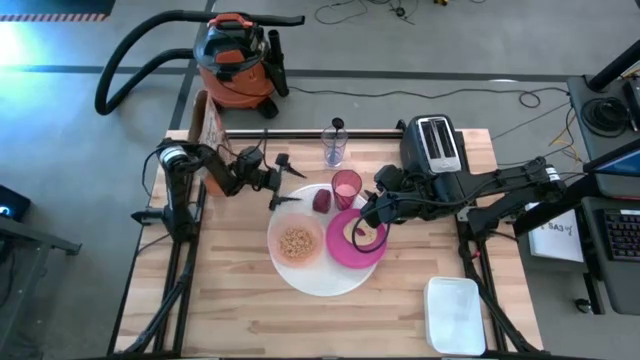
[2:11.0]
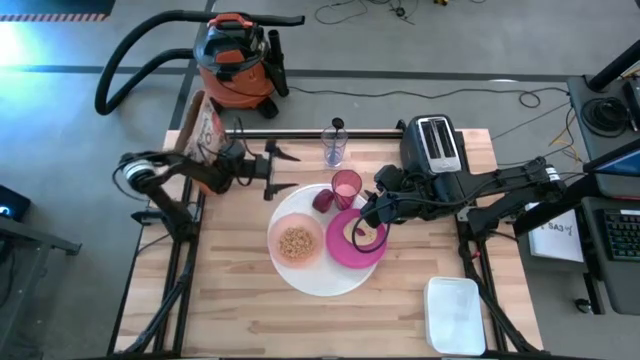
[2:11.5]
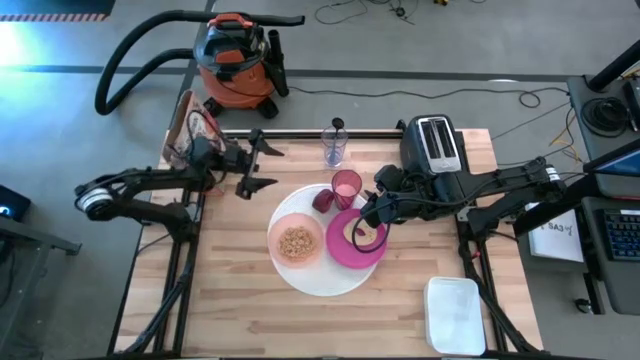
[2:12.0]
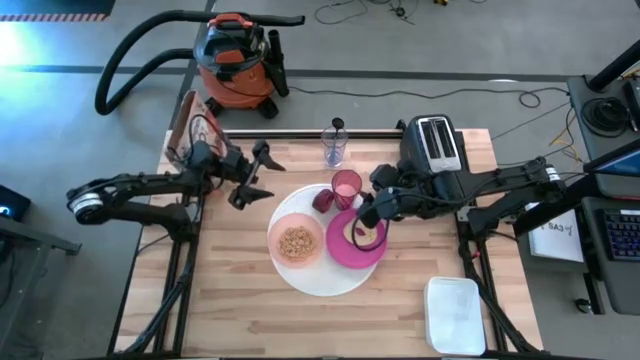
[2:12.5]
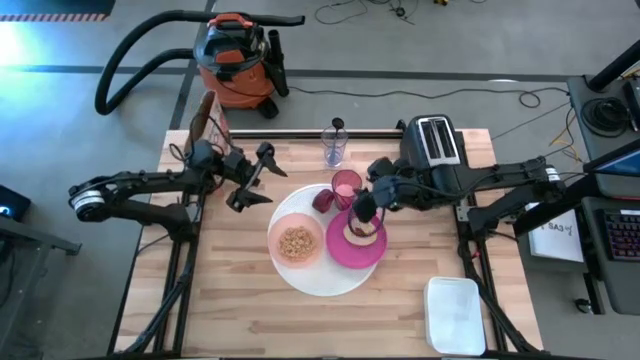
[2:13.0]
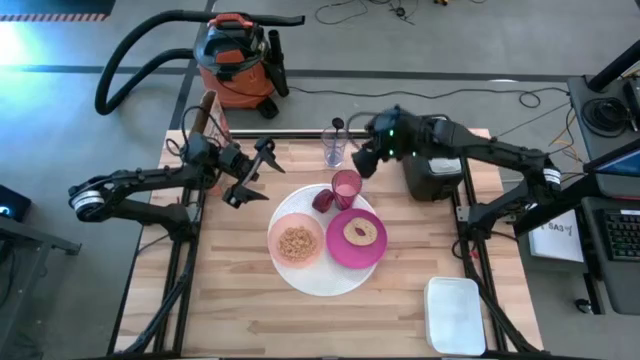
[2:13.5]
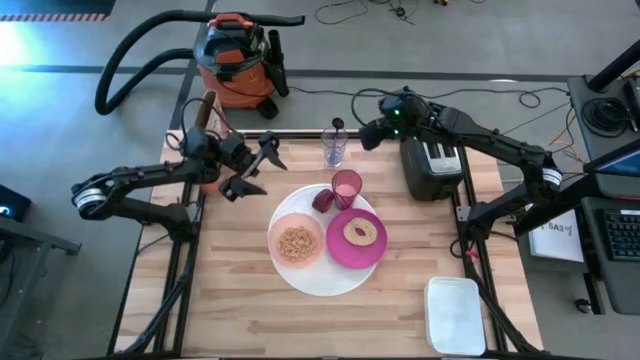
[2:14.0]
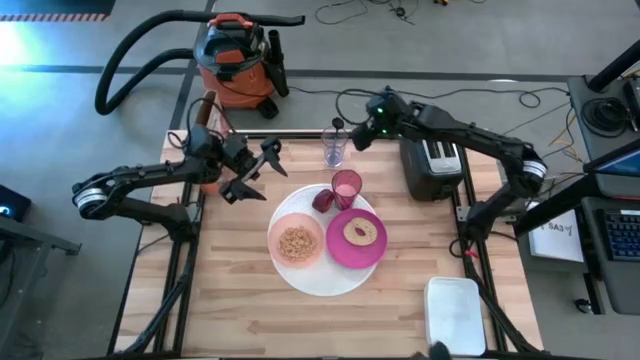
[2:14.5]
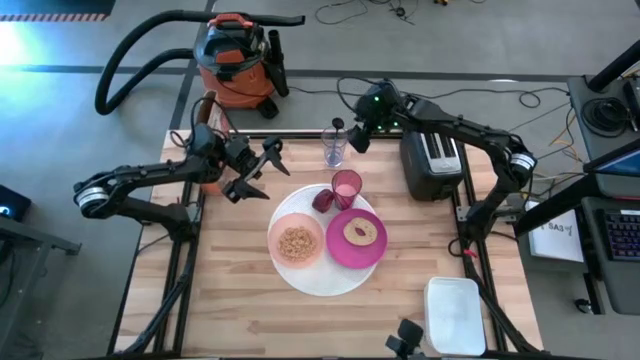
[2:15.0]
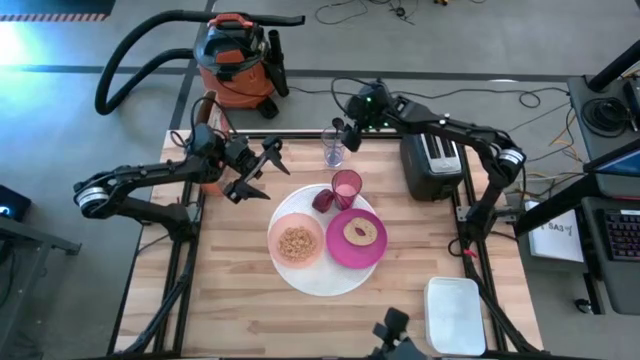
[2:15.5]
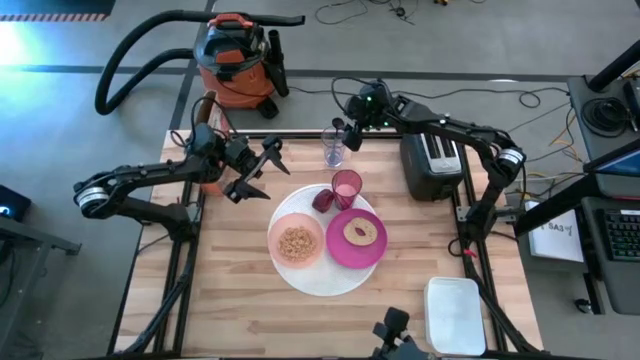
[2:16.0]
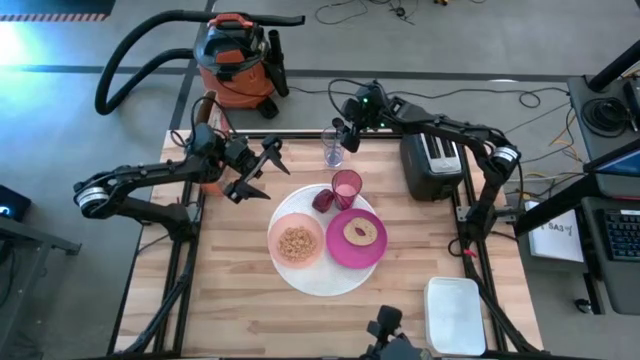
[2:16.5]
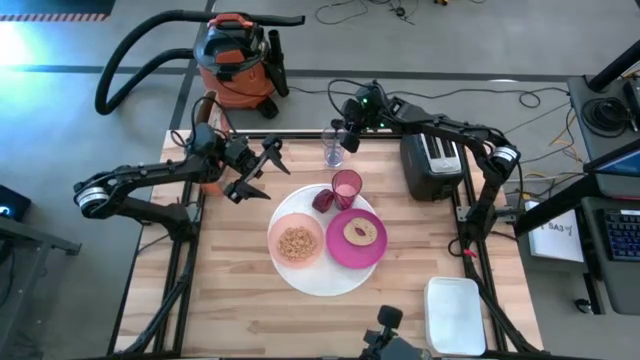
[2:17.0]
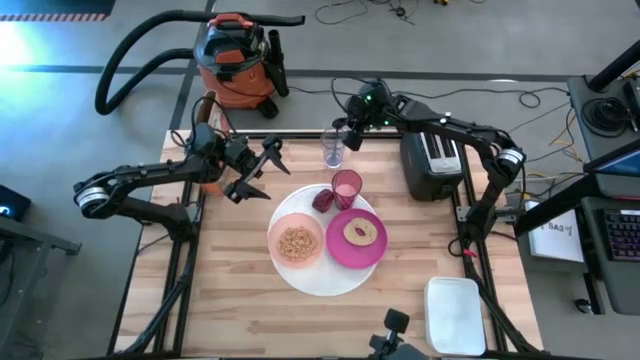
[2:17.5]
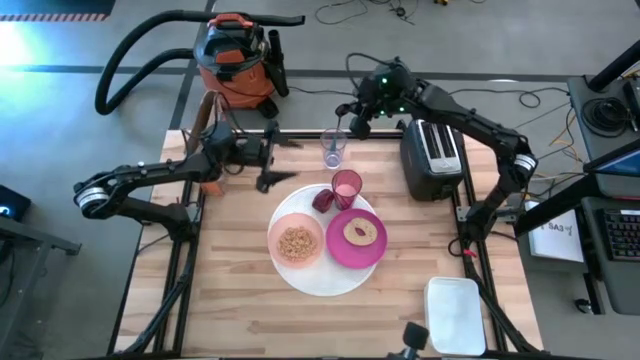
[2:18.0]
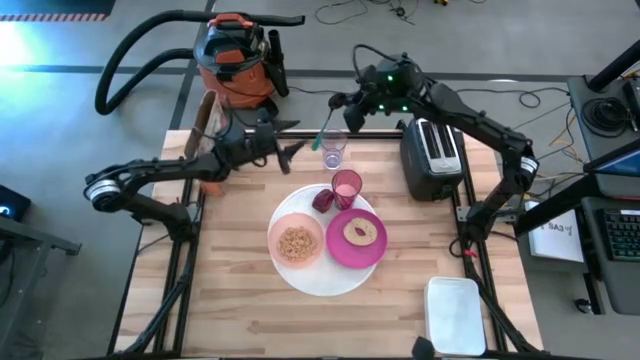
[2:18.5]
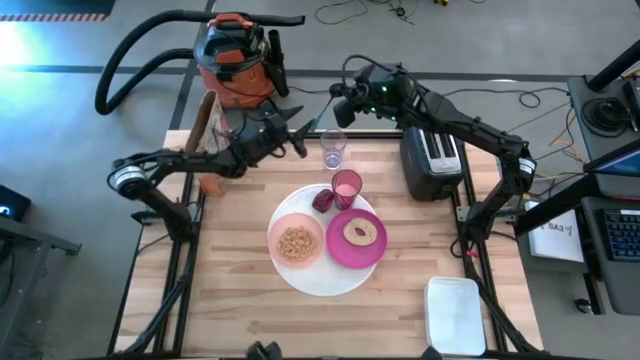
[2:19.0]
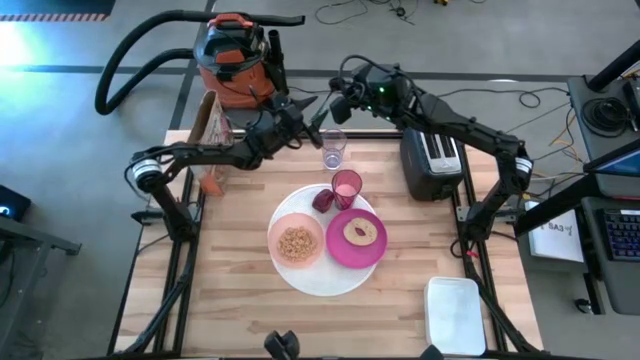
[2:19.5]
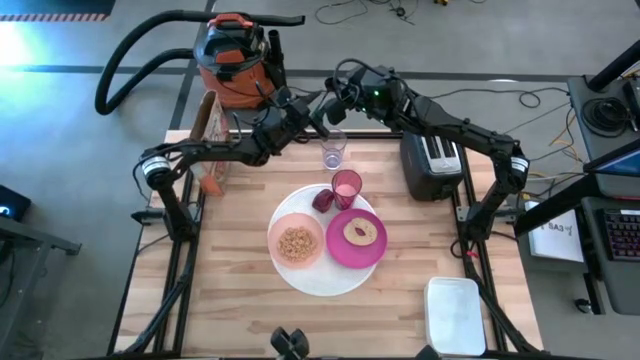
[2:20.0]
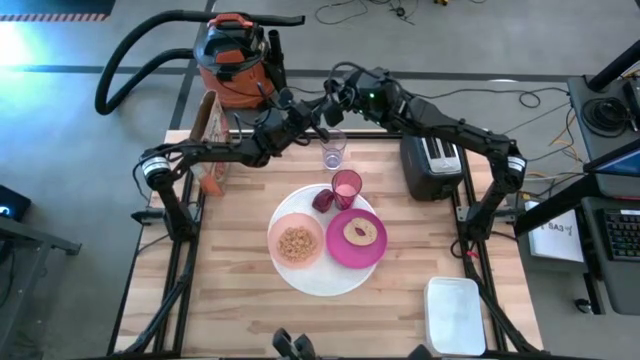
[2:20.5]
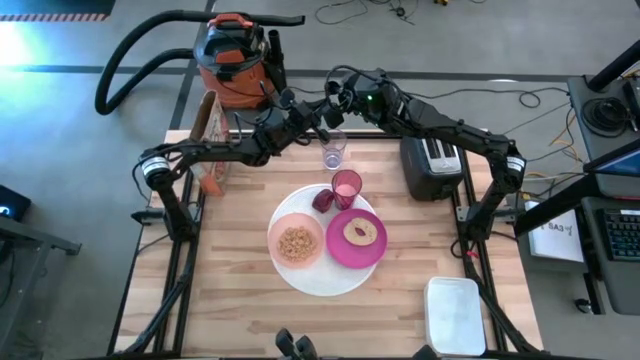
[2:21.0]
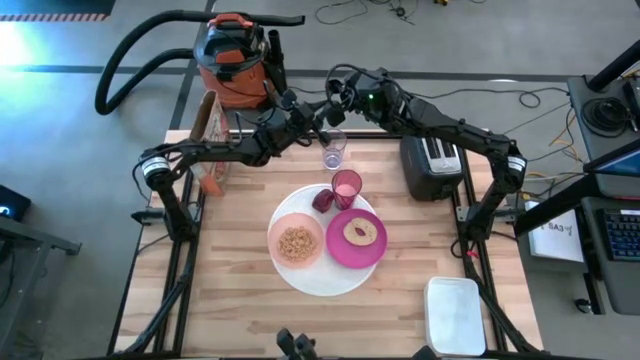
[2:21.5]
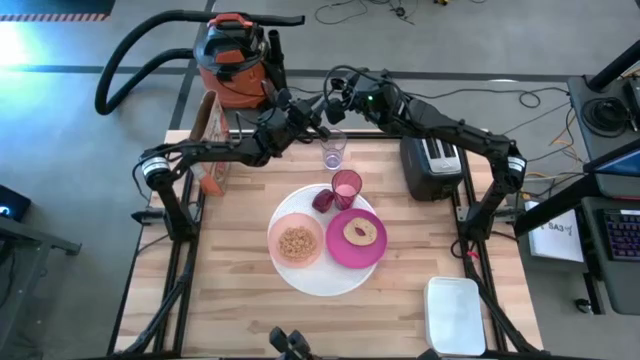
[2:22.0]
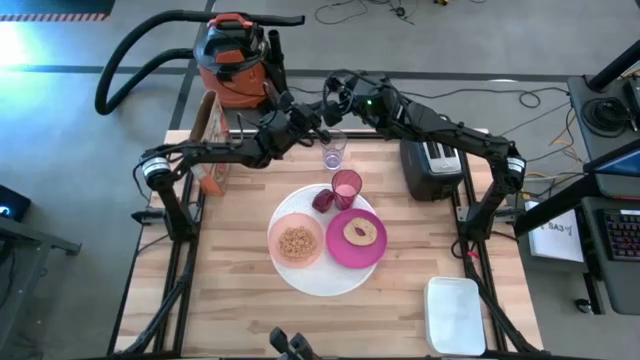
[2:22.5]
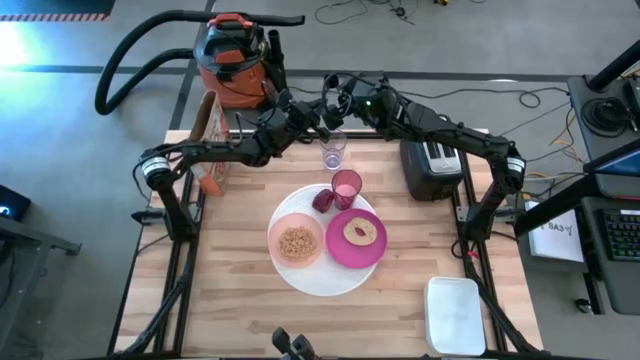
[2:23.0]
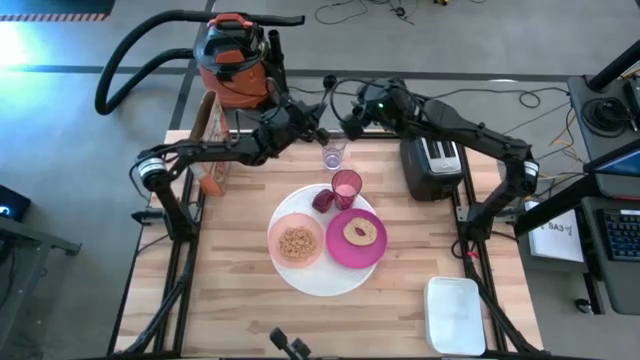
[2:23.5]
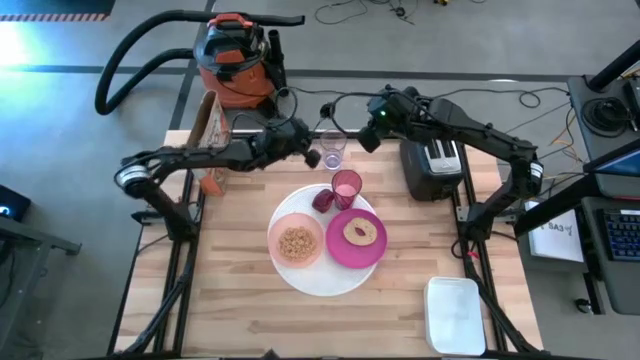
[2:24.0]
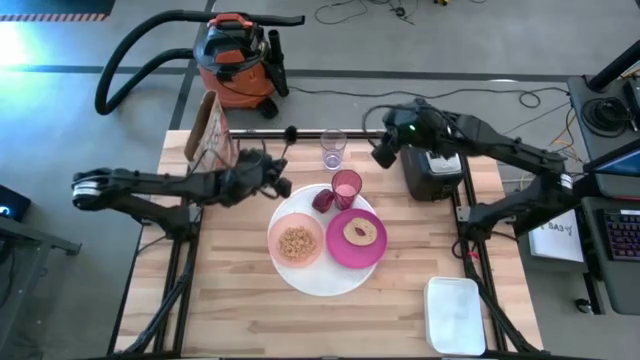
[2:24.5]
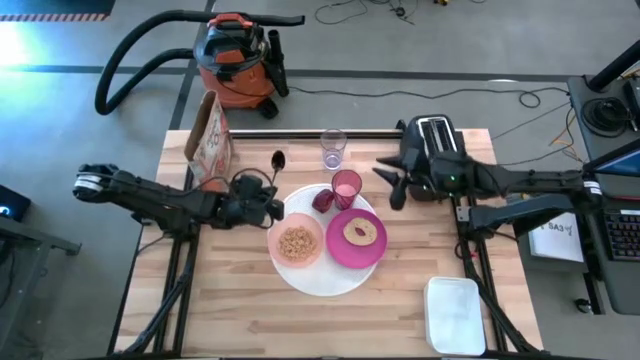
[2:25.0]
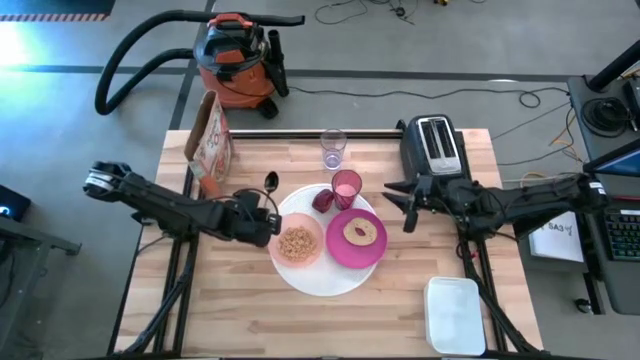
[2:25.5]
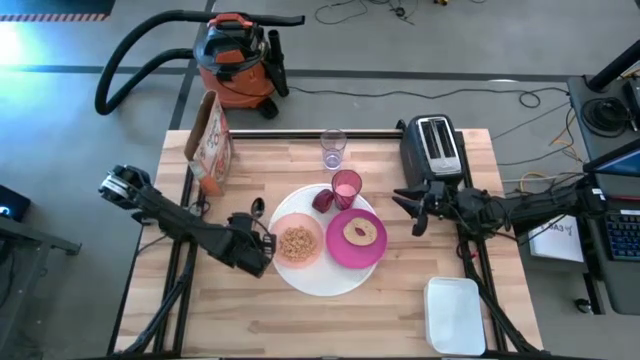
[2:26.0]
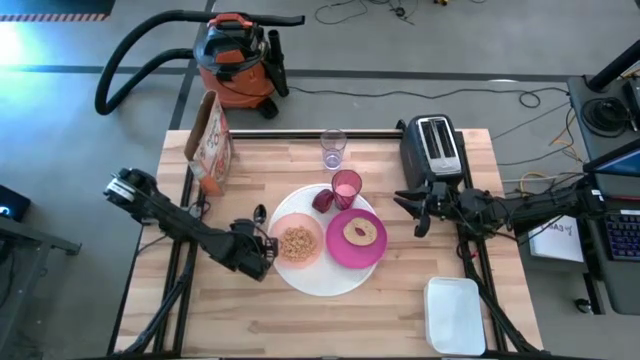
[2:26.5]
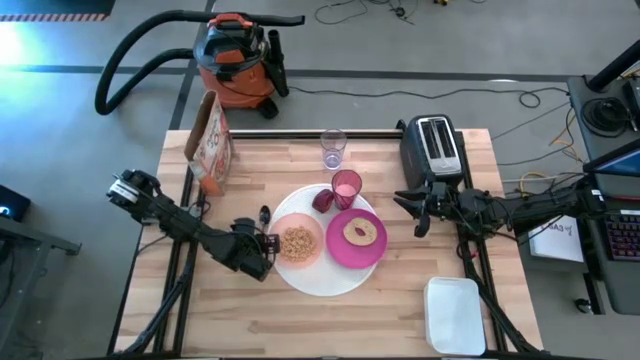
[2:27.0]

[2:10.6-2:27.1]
Task: Arrange a breakfast setting
Put the blue spoon on the table to the left of the white table mat

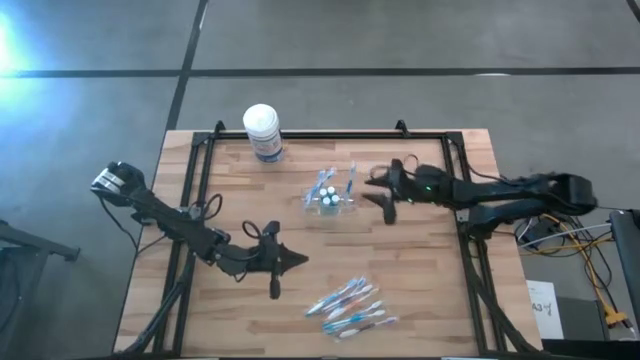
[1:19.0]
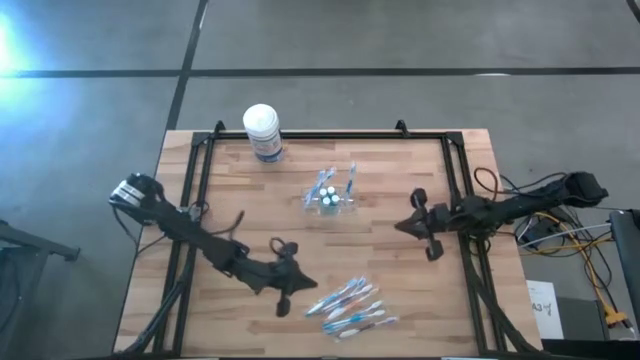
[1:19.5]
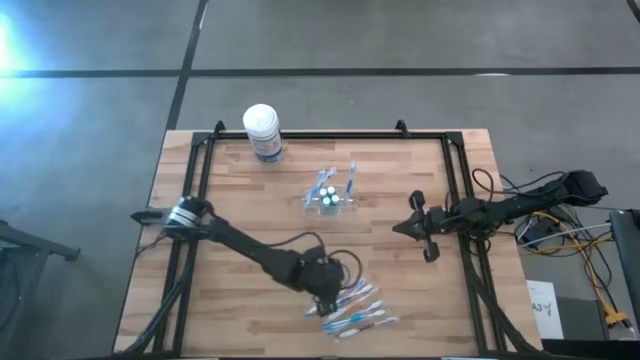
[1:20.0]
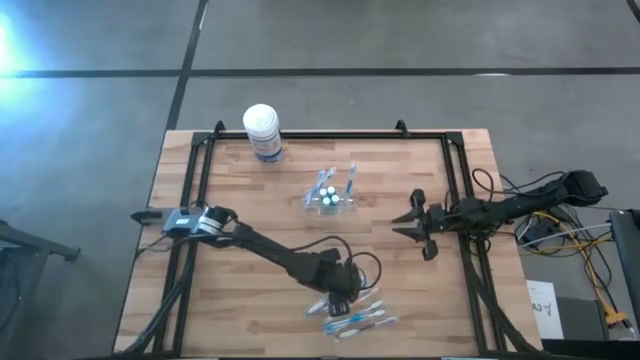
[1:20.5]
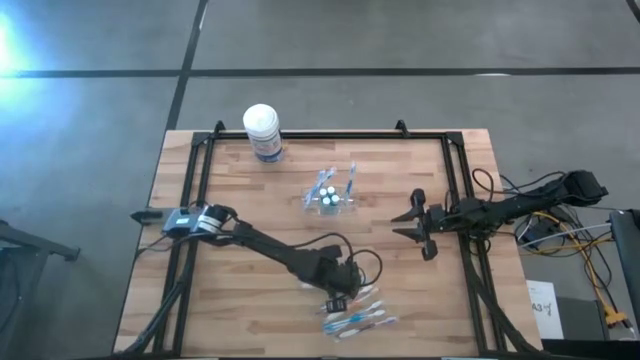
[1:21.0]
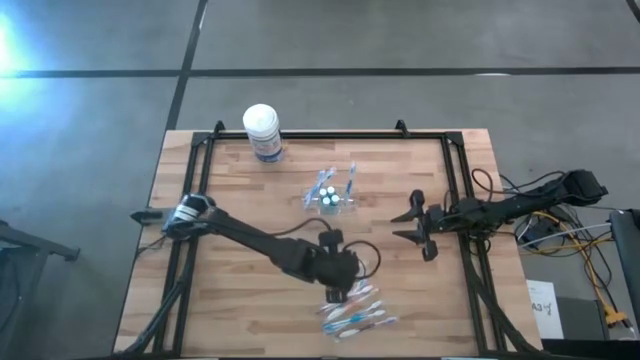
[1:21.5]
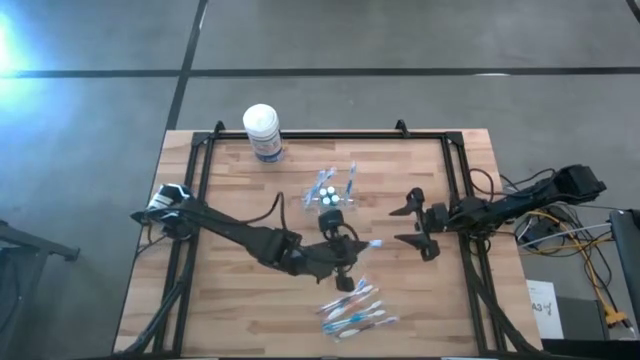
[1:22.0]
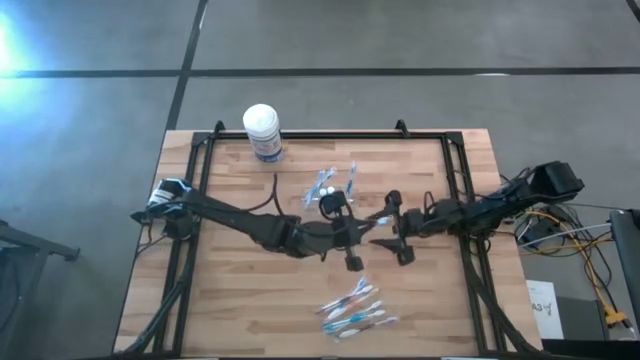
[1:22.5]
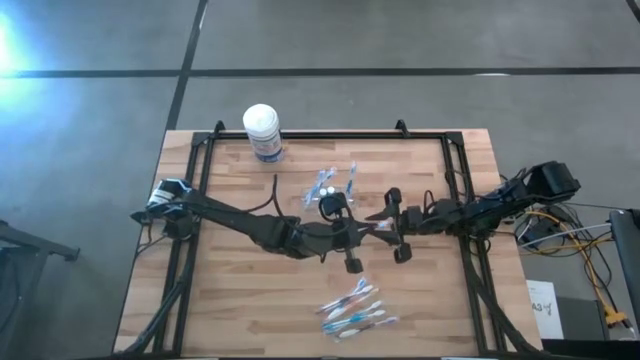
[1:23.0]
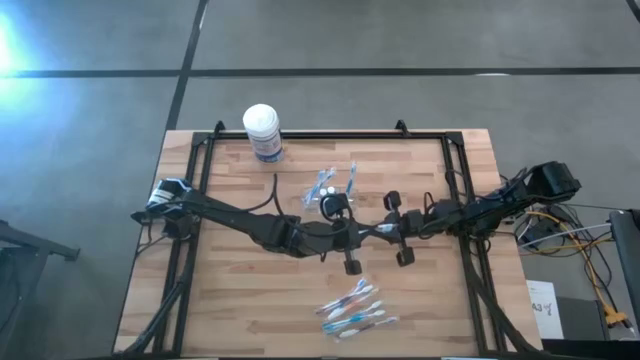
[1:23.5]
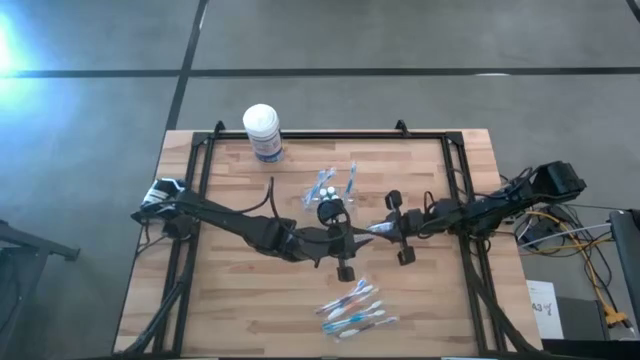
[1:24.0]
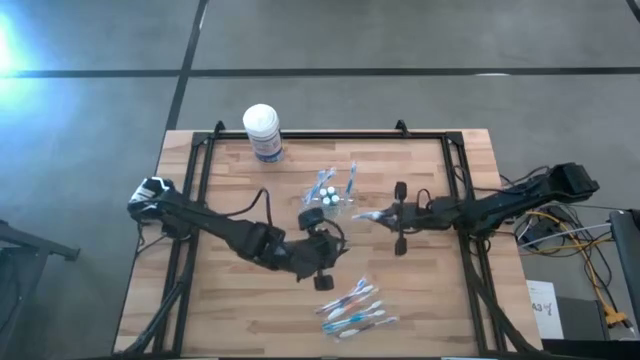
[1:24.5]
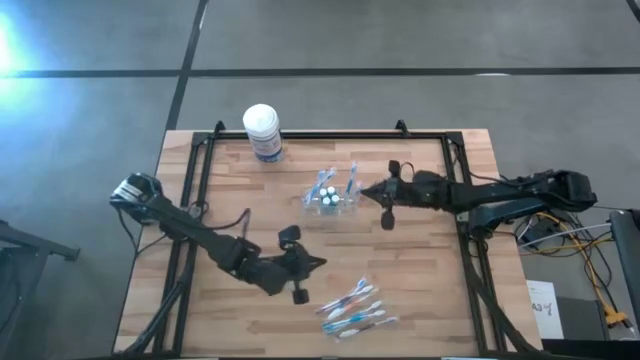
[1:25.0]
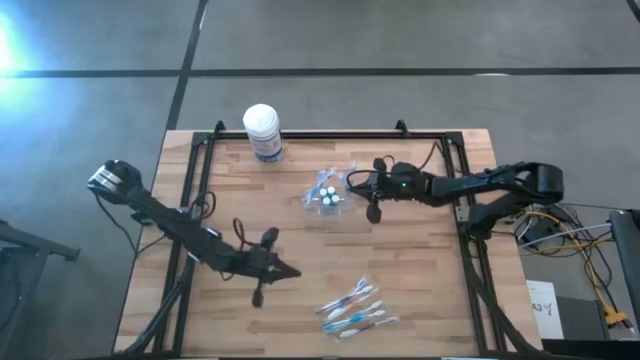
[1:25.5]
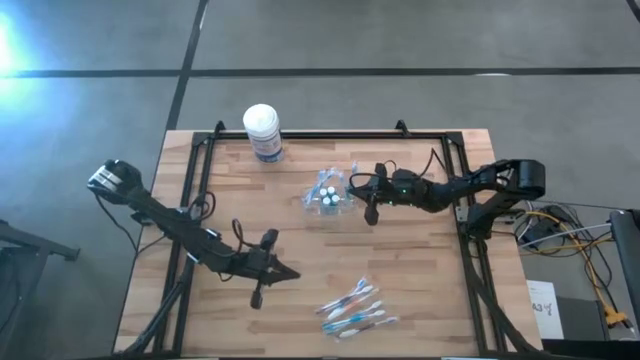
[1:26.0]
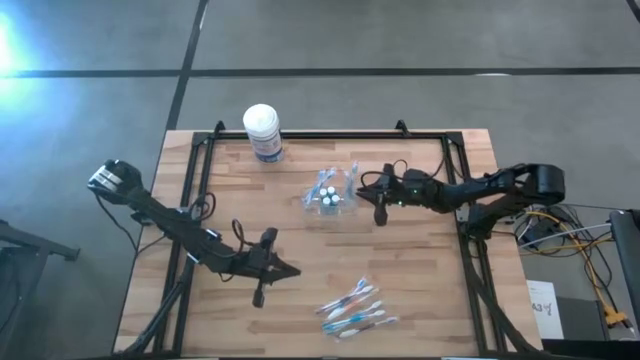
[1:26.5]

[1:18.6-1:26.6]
Task: Pick & Place toothbrushing station
Put the blue toothbrush into the transparent organizer
